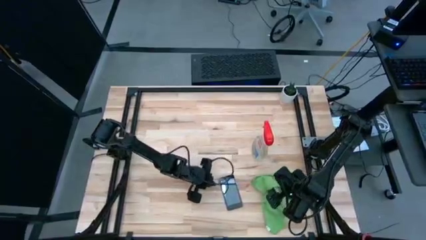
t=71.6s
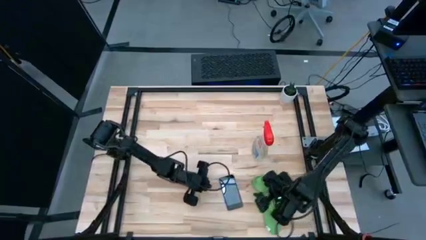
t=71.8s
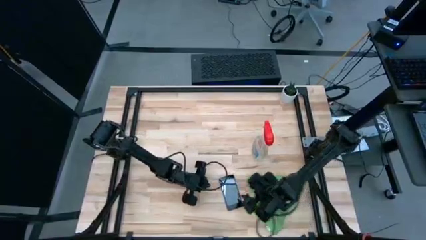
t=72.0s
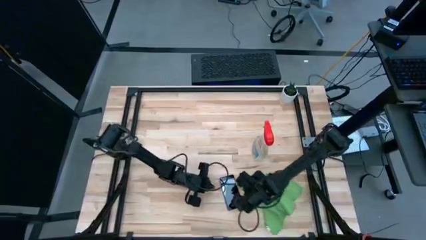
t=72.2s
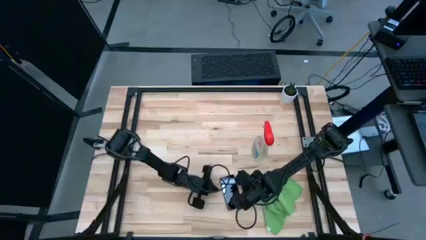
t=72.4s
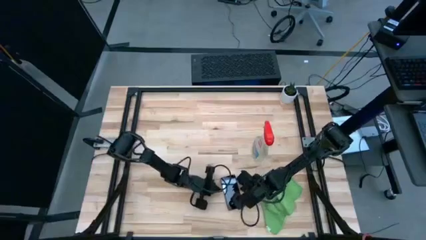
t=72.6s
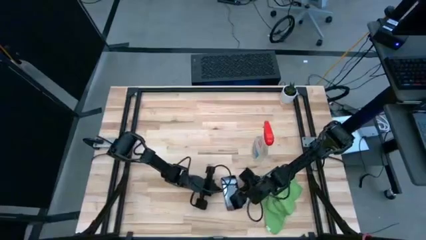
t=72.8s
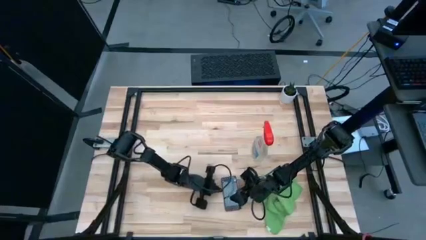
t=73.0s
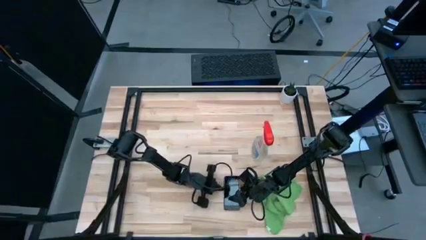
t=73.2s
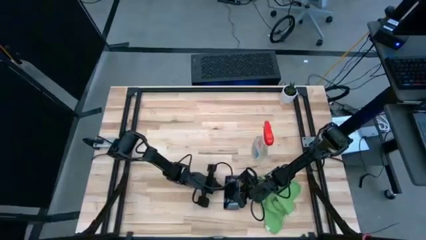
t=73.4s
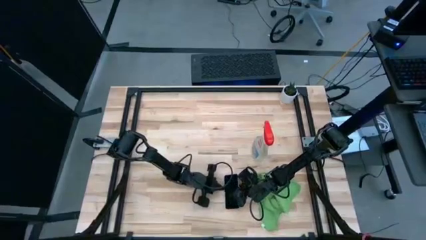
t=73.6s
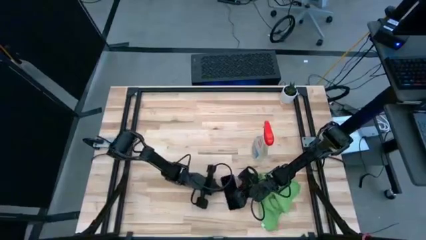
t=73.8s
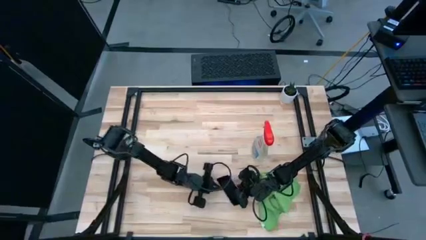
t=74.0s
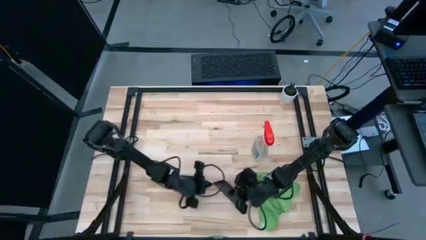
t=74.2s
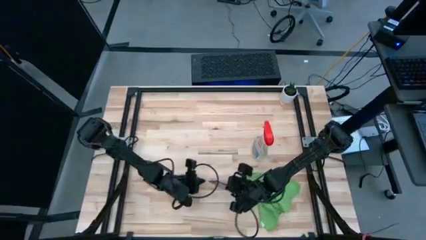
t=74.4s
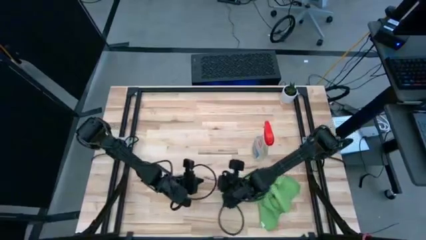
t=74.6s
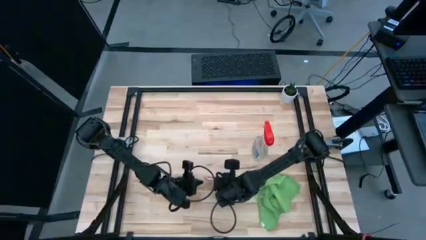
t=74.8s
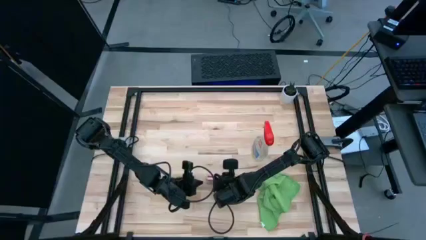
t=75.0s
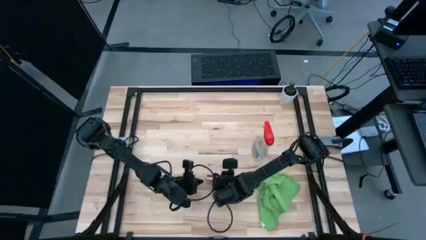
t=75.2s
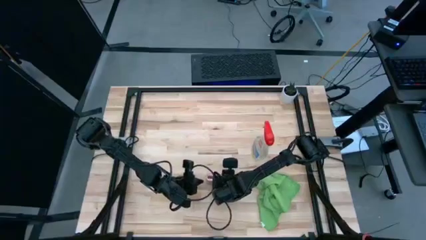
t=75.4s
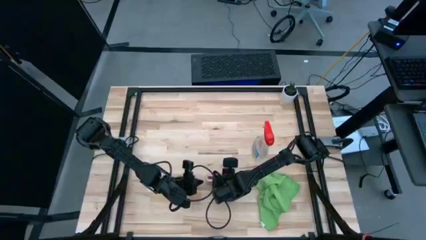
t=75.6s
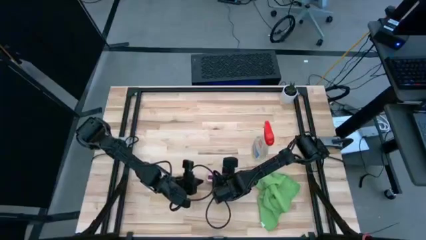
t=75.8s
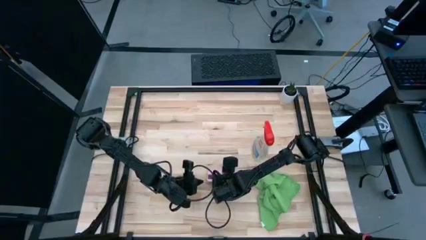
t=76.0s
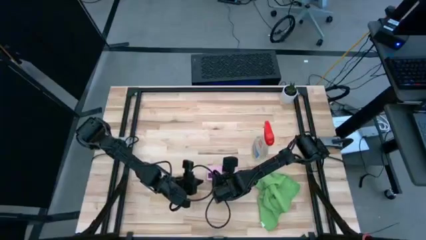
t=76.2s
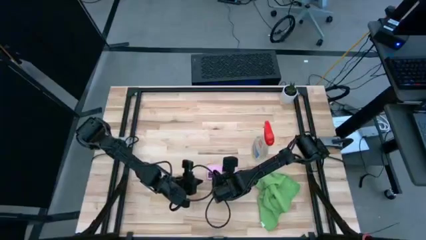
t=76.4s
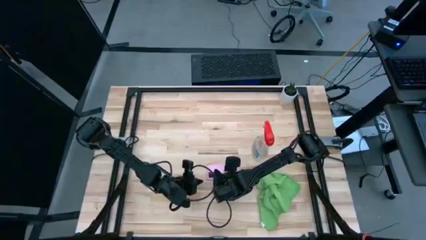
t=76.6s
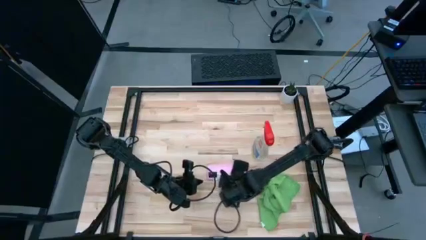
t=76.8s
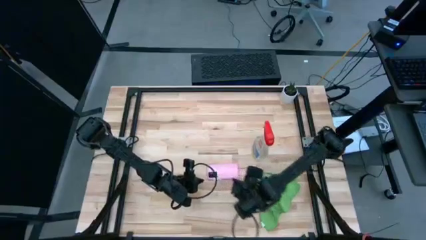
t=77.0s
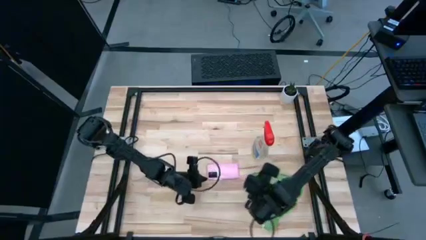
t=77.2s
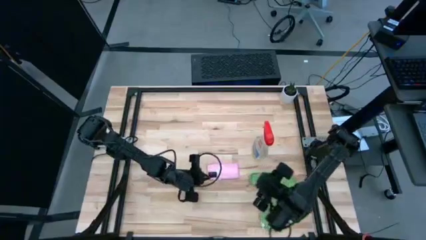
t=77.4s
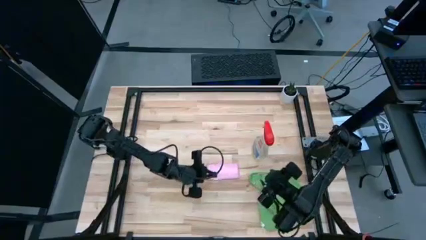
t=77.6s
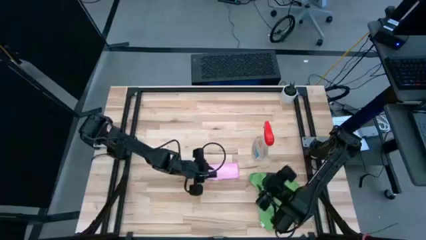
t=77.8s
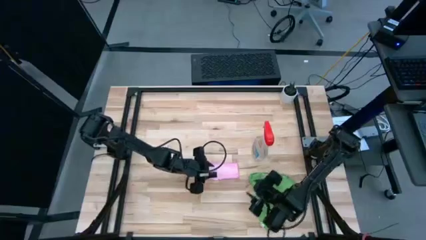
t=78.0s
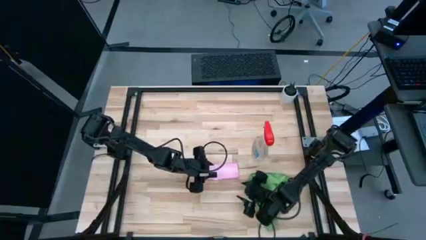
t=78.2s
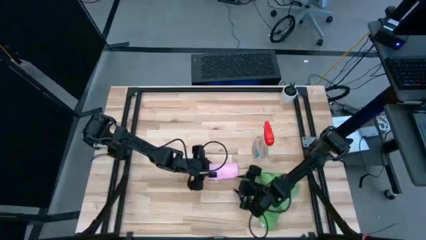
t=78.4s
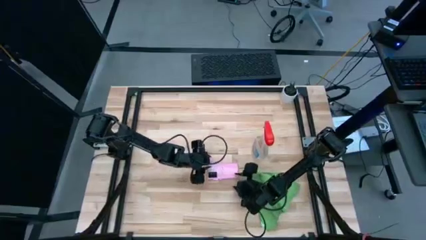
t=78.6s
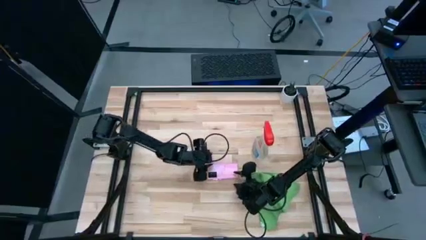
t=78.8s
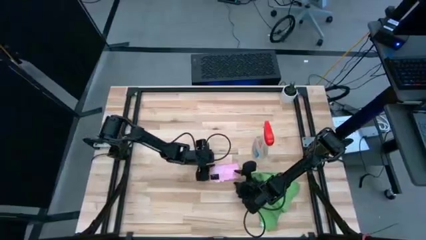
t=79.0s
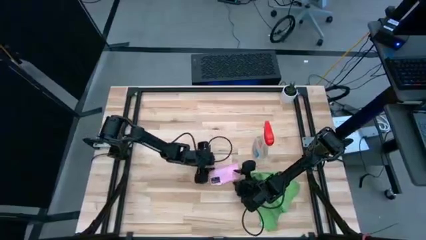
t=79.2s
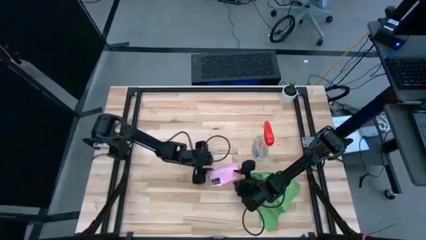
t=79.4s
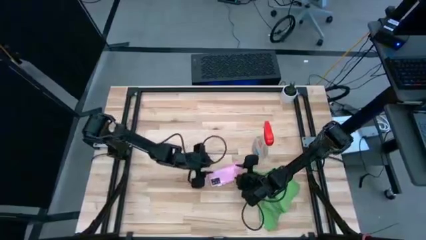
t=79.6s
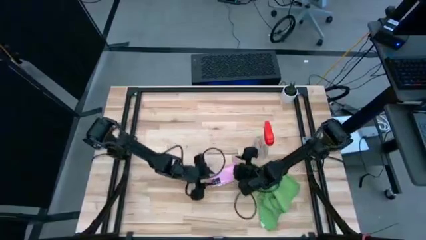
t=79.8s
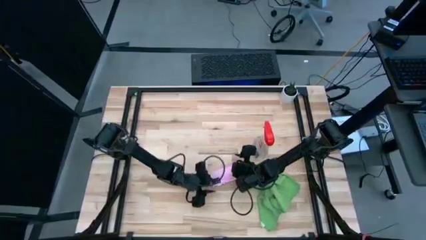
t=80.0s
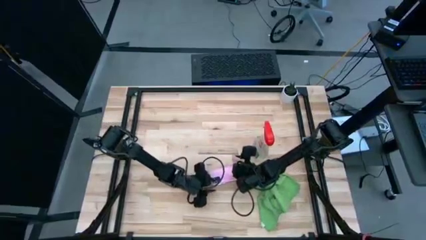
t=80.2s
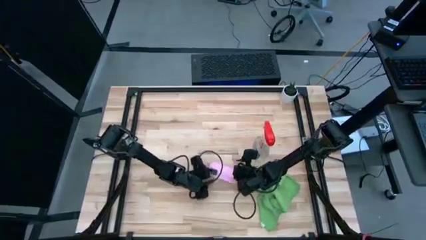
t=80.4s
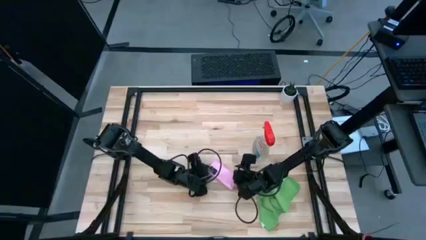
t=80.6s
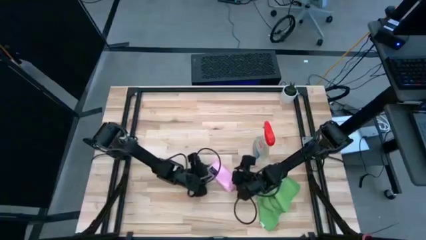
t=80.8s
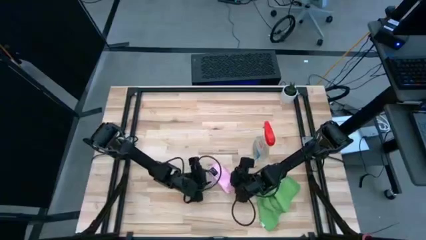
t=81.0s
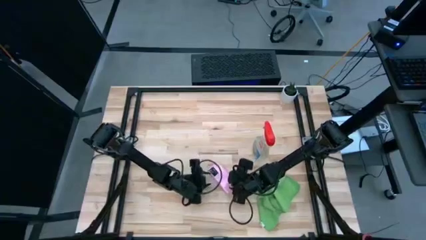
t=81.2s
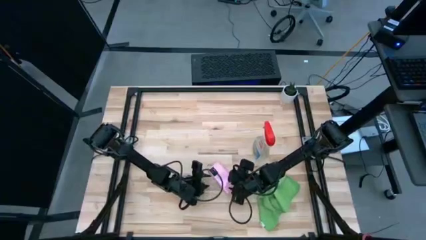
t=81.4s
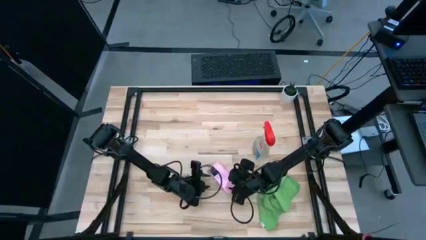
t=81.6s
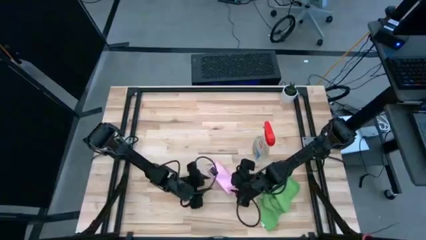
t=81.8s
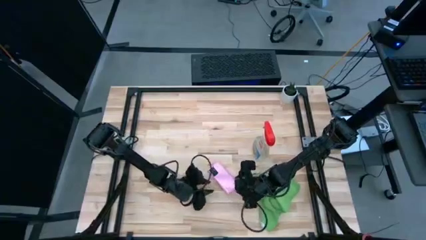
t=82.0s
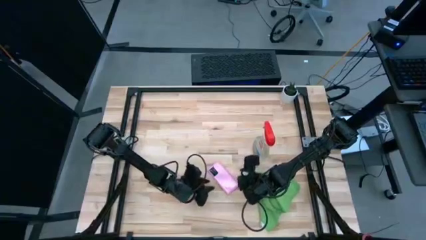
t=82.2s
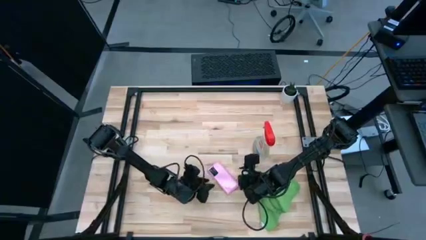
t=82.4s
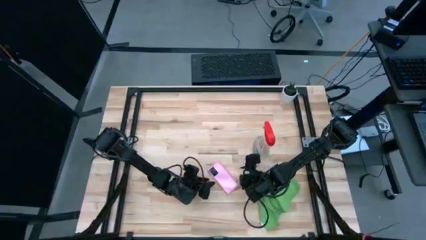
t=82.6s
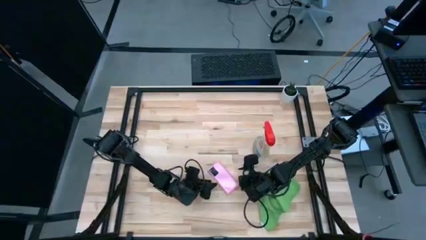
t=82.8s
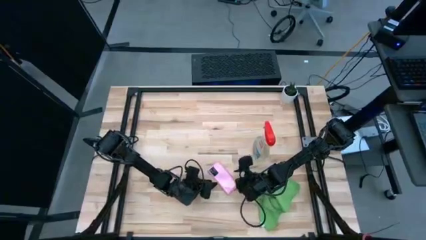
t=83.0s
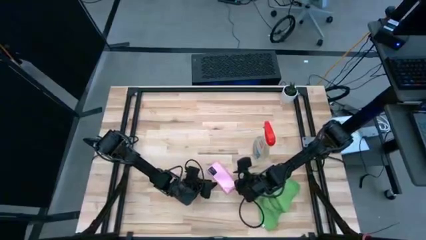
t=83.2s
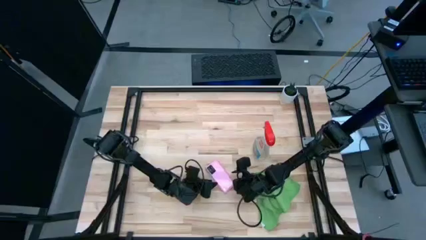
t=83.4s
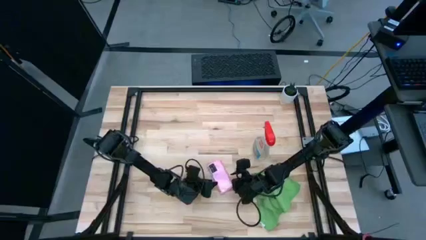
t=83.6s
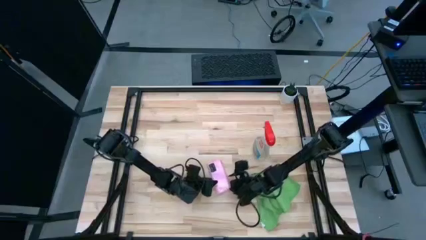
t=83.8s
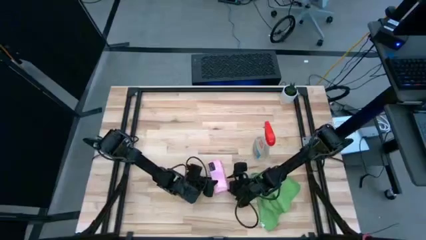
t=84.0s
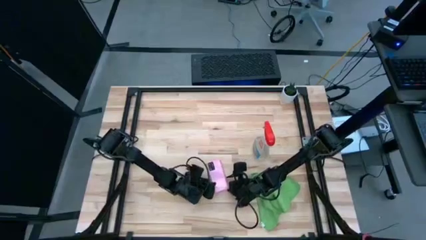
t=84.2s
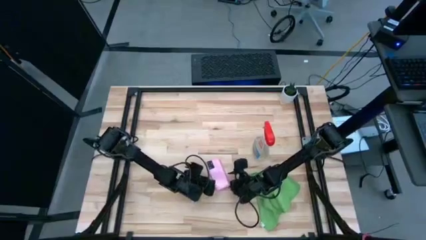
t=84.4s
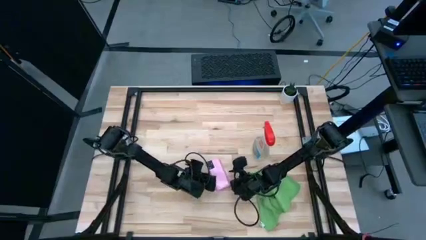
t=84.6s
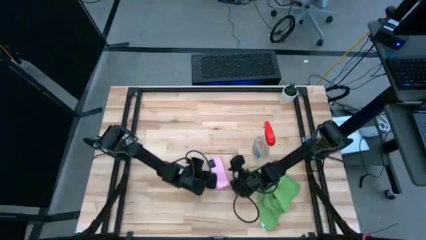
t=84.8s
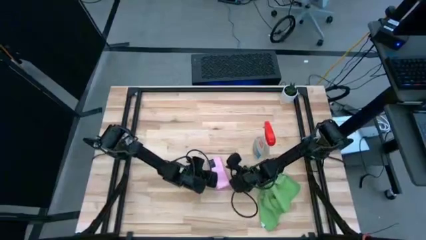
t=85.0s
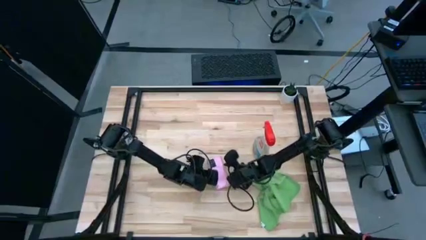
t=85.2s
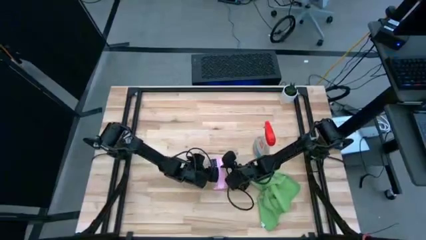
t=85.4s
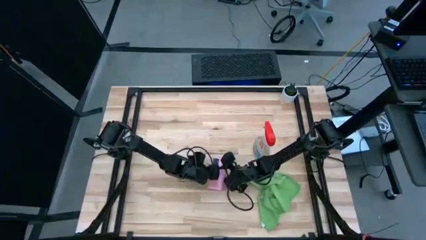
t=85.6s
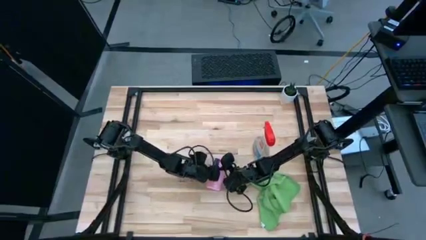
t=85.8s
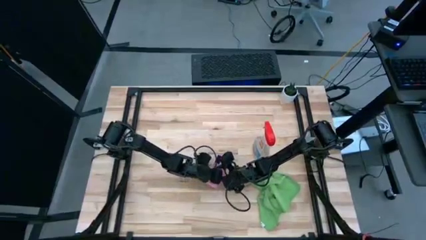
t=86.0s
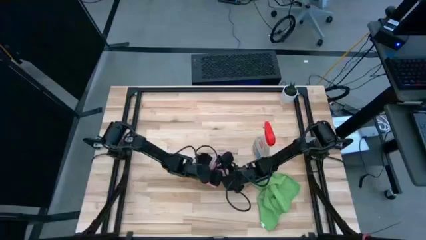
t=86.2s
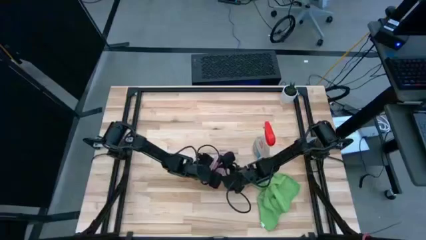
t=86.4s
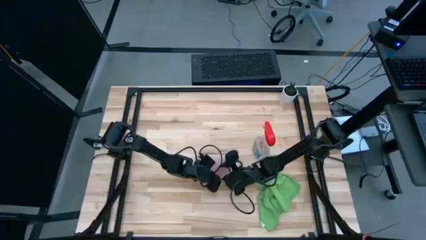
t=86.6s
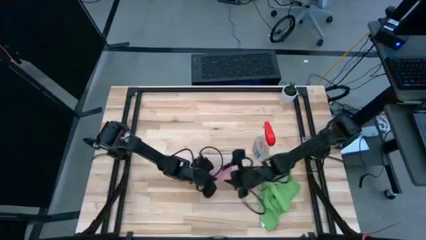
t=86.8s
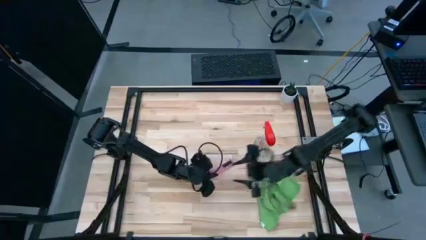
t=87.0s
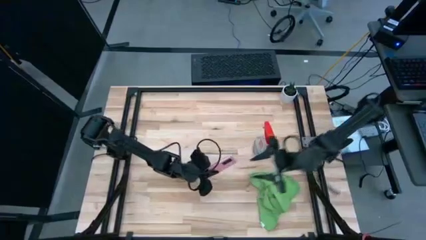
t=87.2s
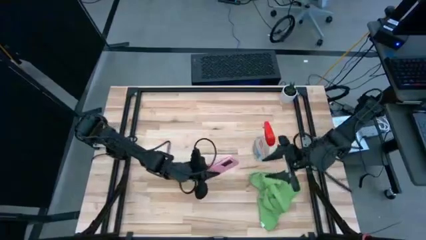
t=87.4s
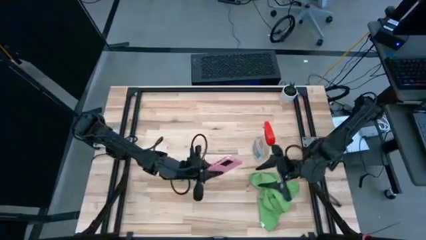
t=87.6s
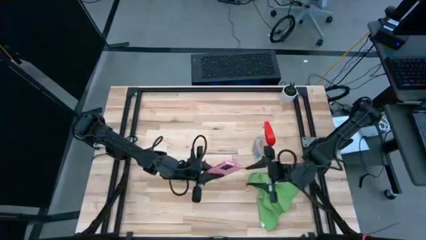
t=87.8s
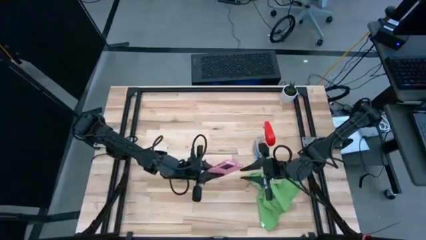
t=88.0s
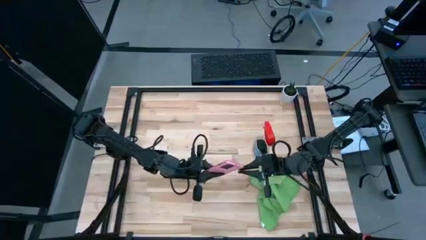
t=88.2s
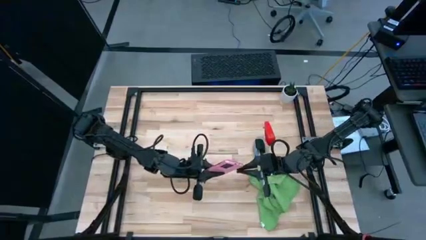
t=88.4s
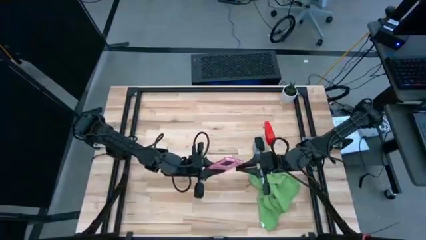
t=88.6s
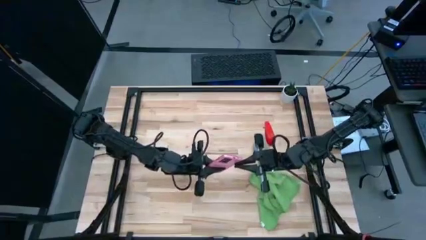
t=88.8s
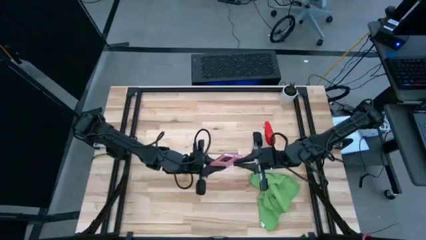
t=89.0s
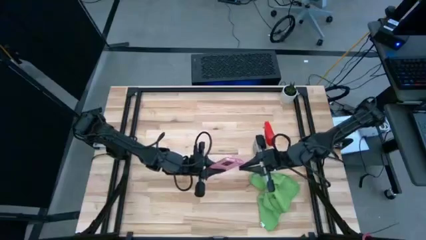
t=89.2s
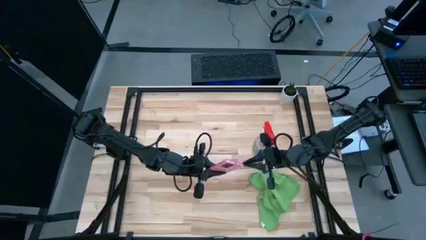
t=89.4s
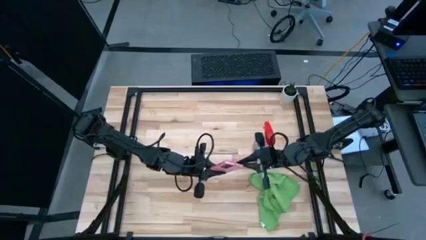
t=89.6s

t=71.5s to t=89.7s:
Task: Apply microfiber cloth
Spray the back of the cellphone with the cleaning bottle
